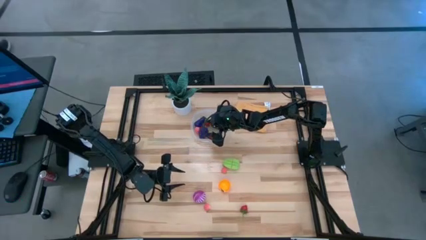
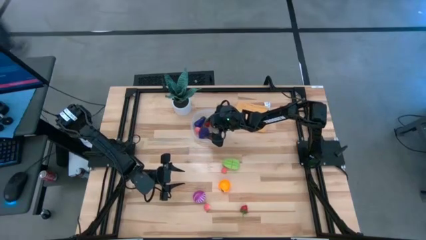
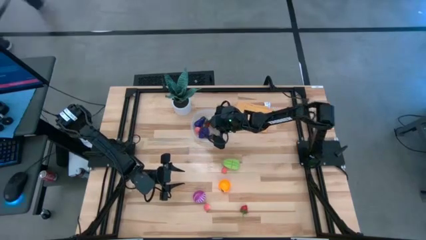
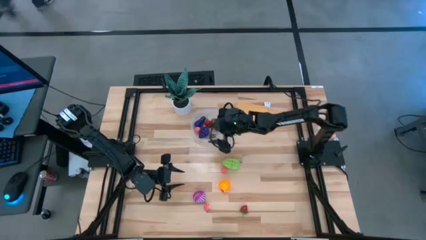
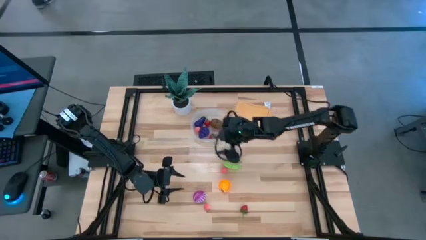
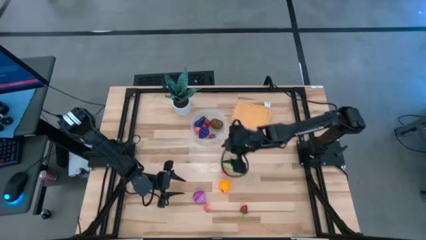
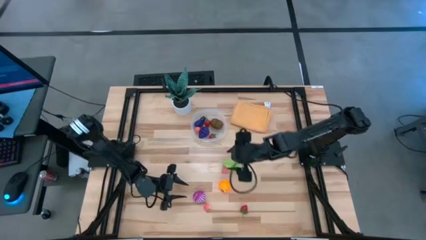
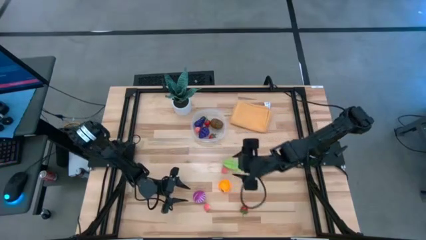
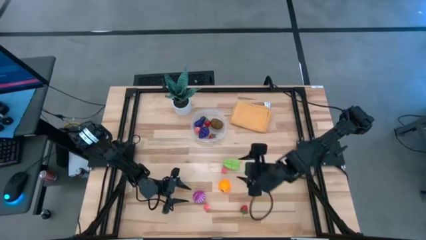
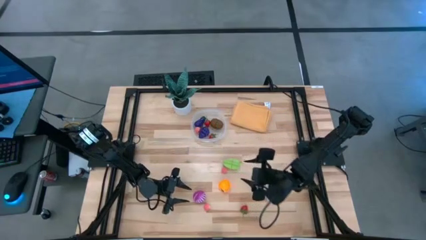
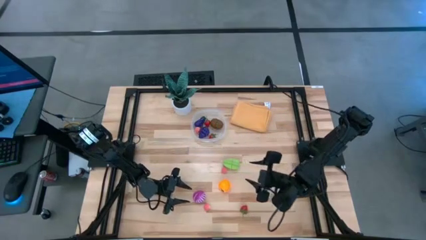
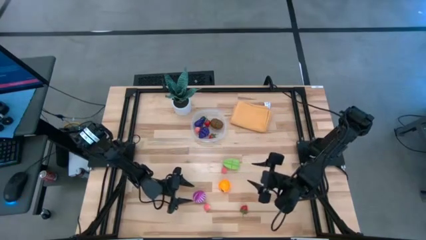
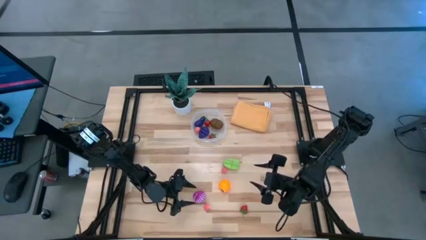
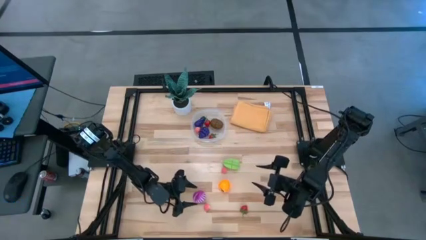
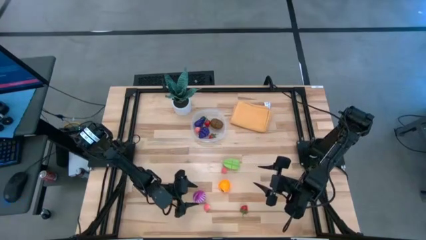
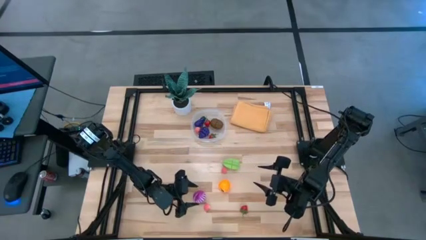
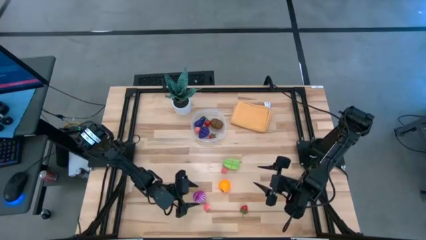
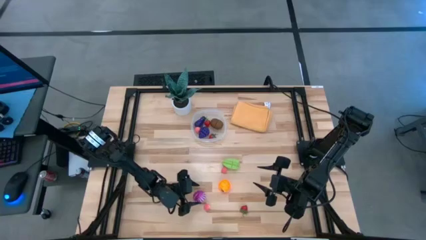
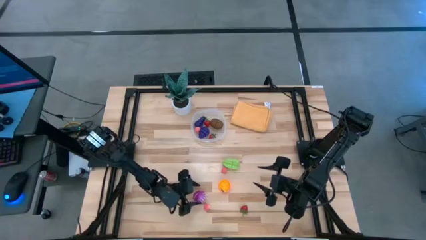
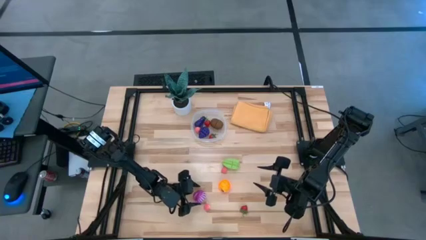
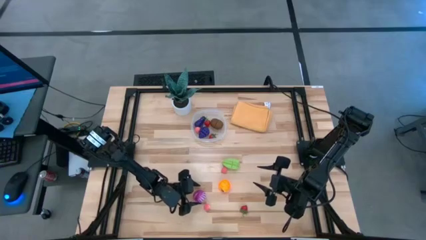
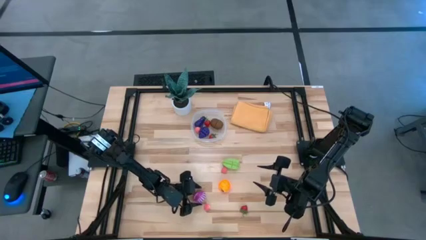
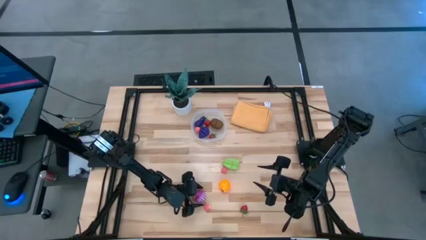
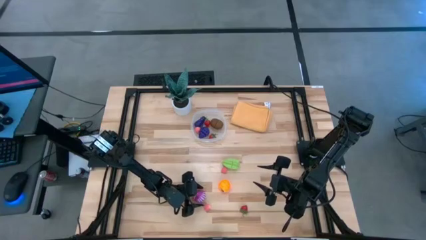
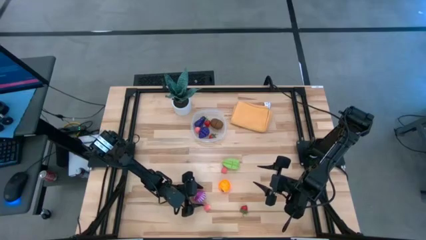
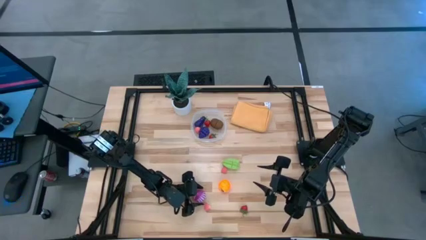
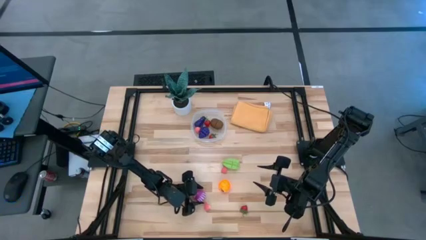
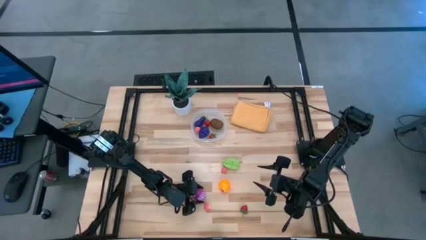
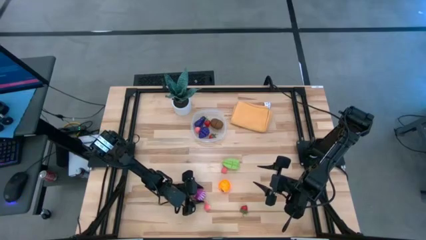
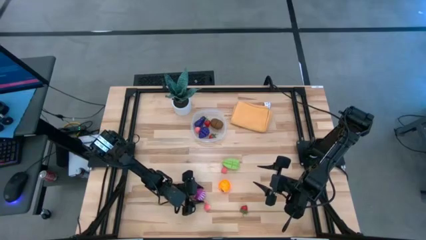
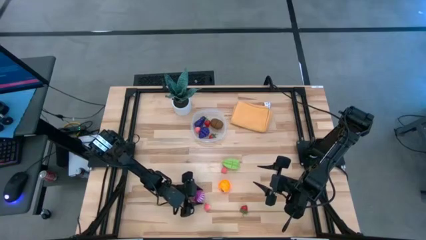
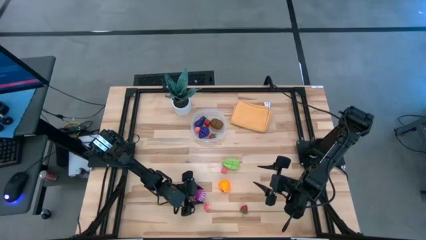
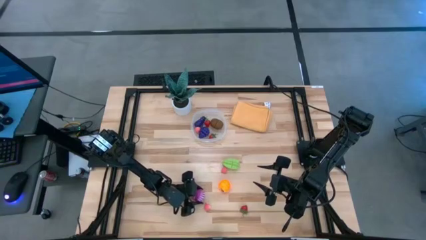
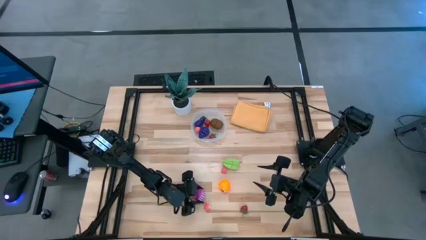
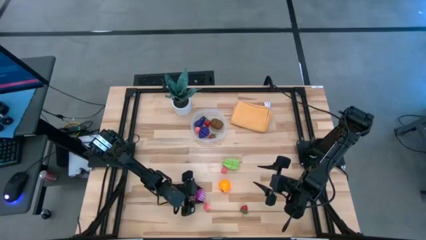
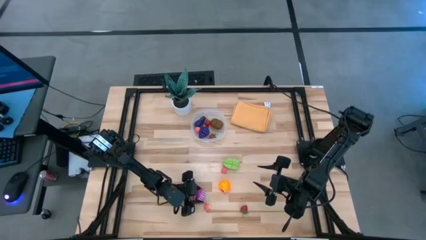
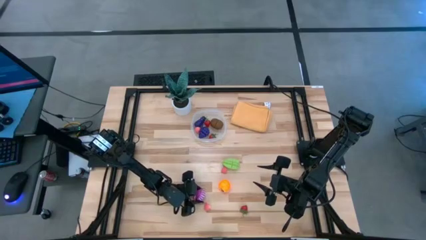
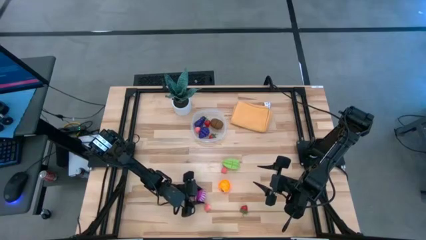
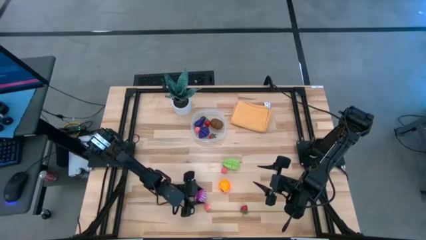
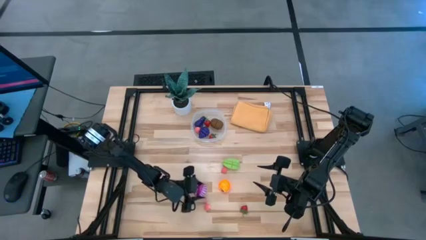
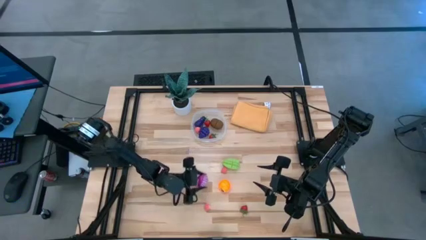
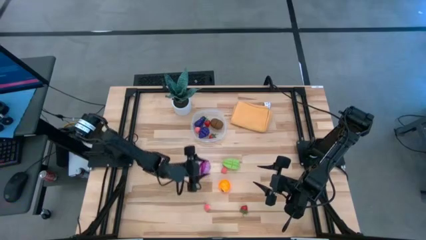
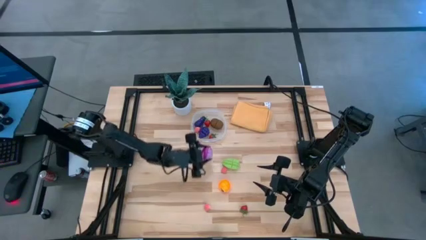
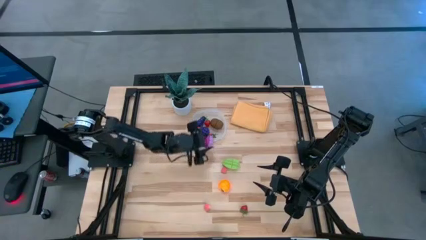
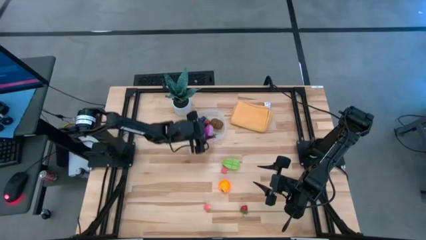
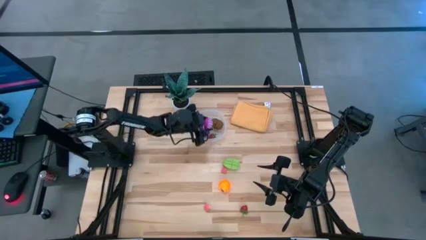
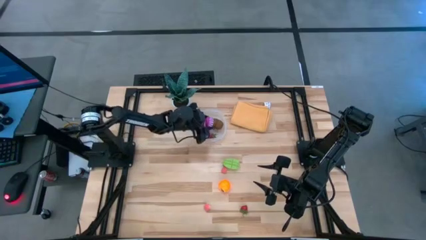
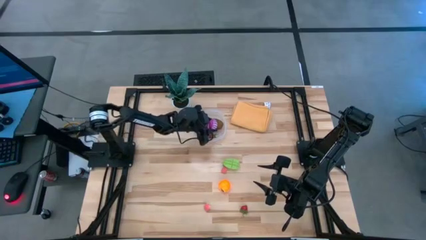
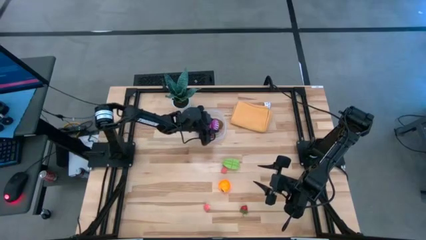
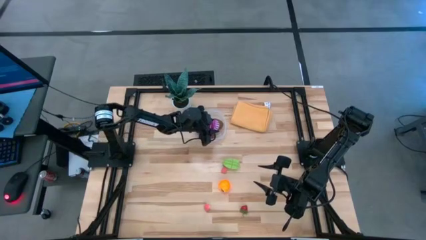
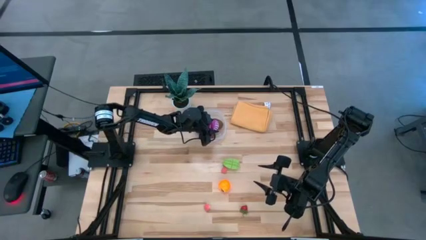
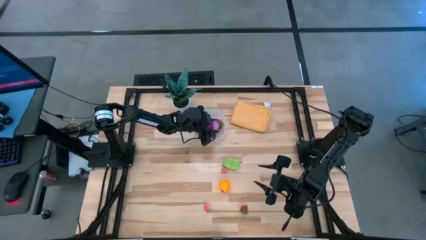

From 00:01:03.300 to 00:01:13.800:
Task: Pick and placing Produce into tupperware
Put the purple onion into the transparent bin

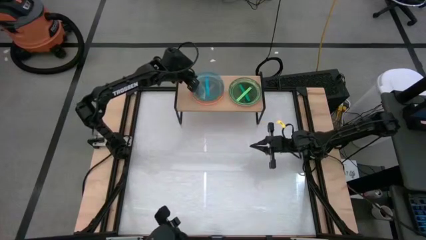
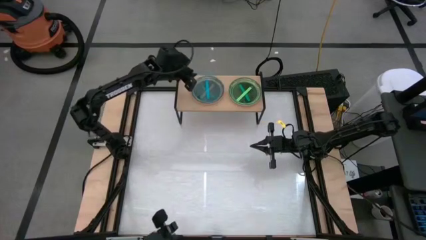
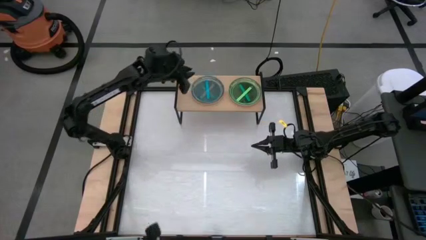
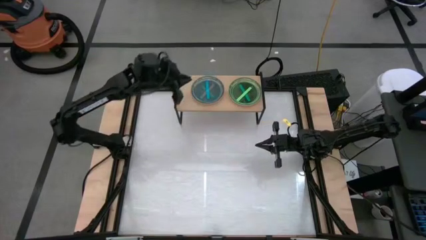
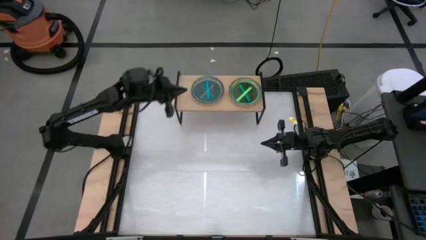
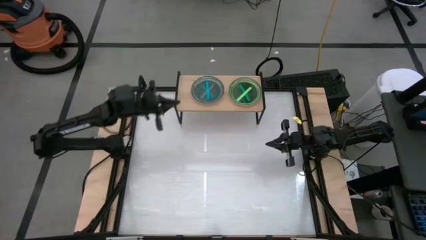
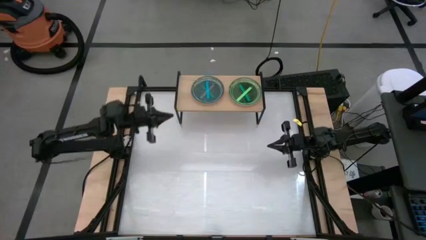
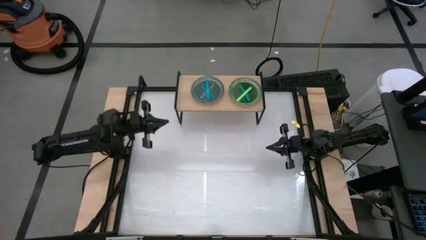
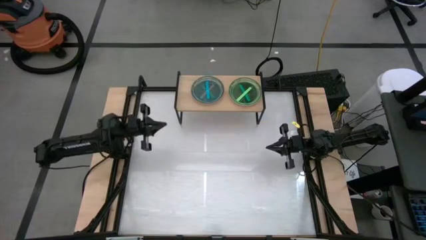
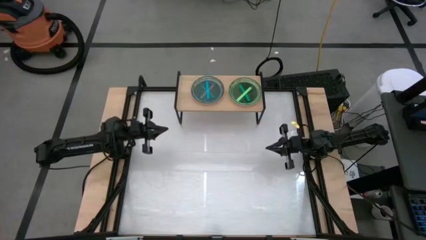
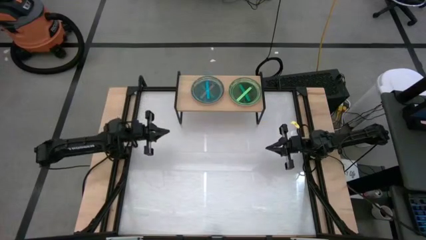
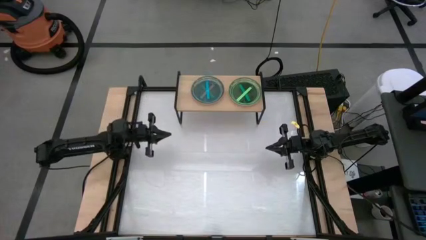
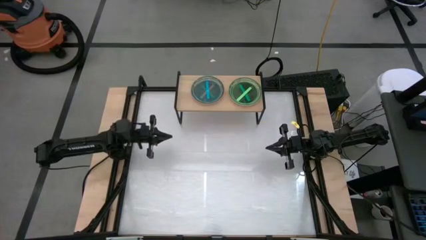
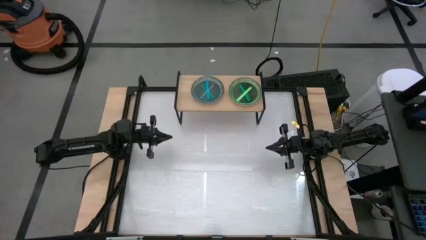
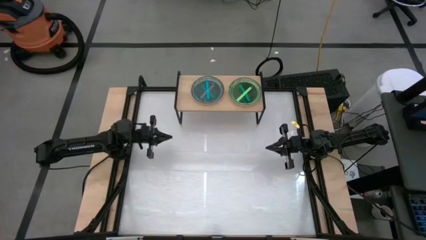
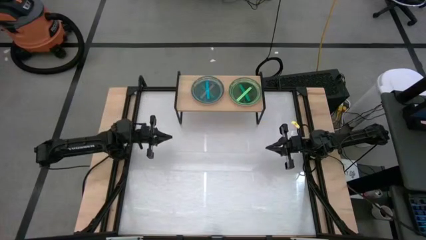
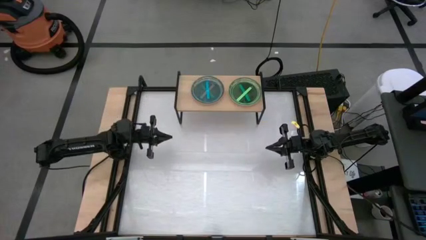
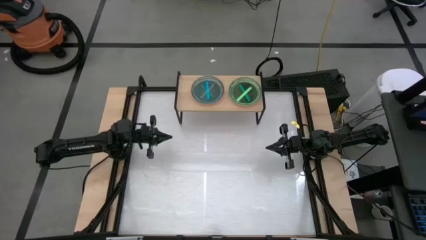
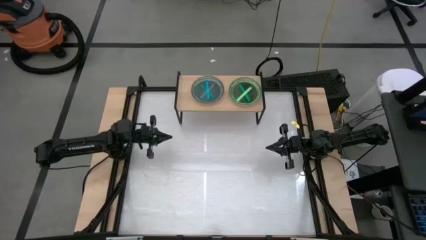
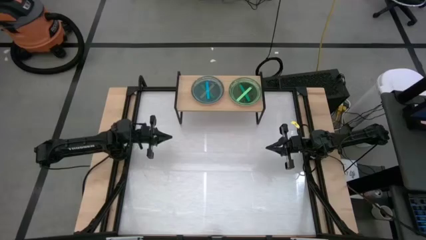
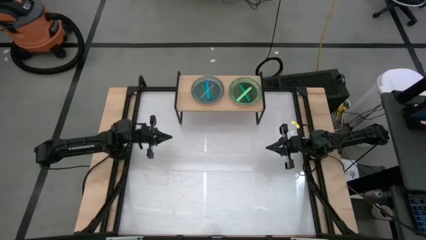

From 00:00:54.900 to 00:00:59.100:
Task: Place and stack plates onto a shelf
Return to Home Position
